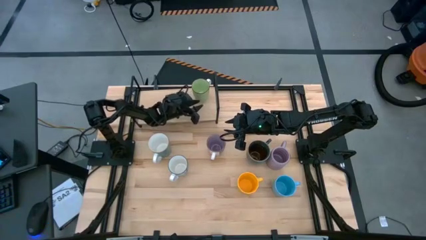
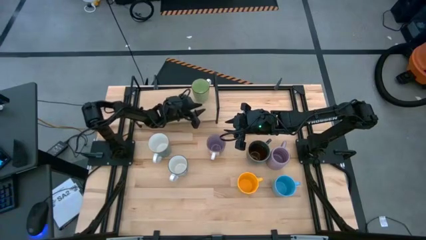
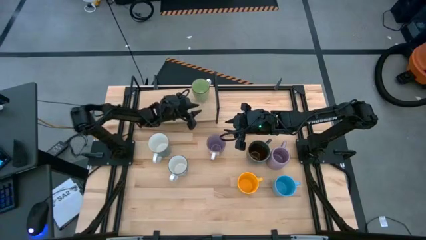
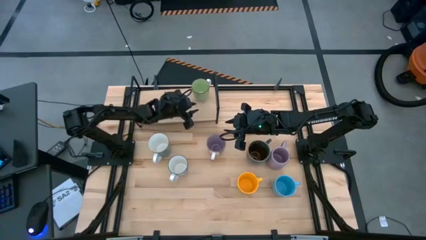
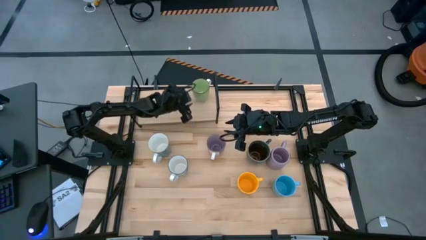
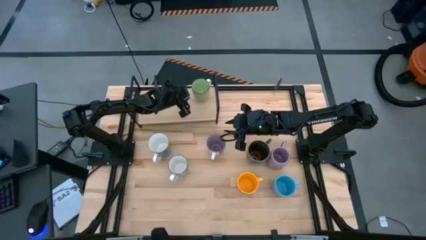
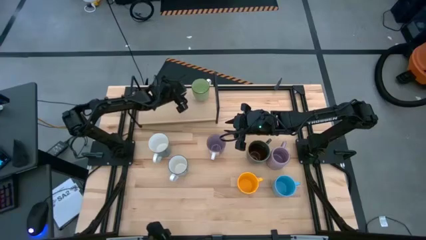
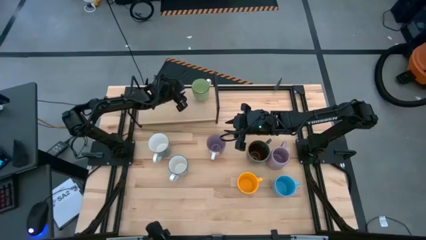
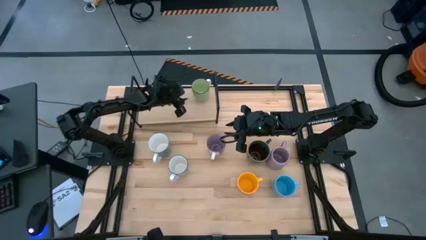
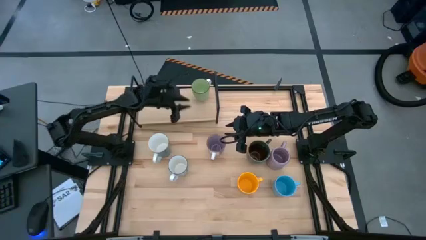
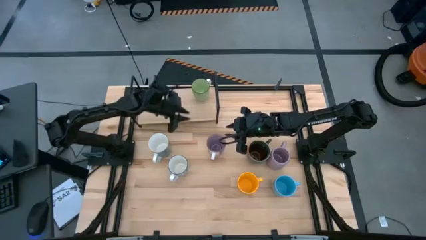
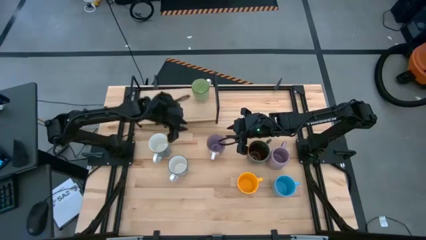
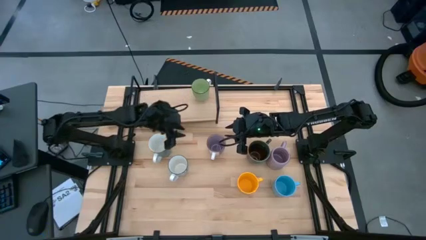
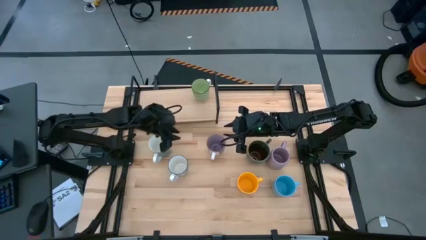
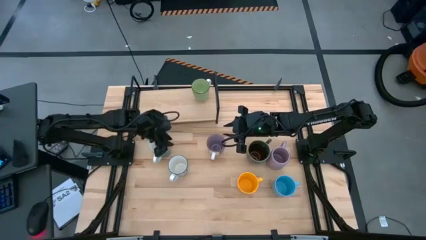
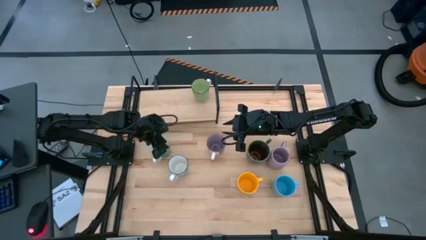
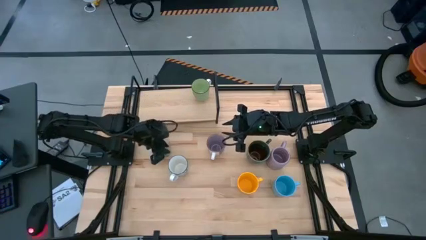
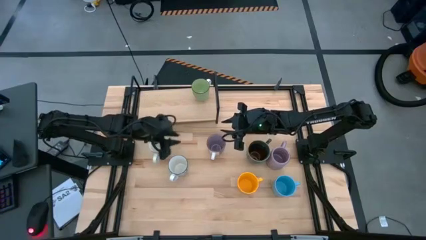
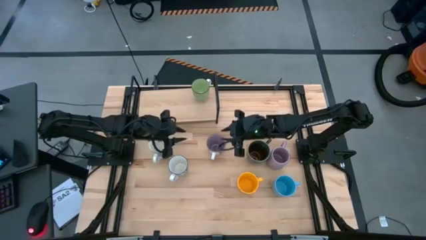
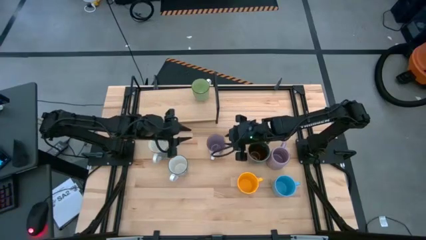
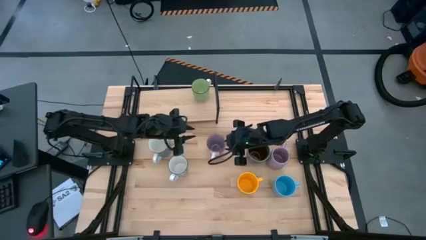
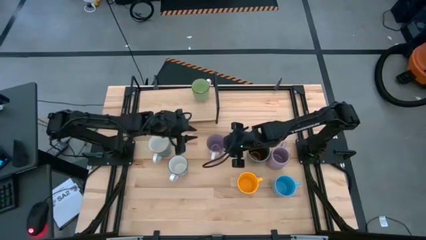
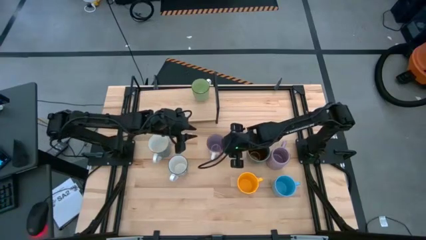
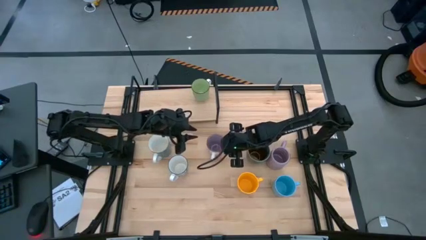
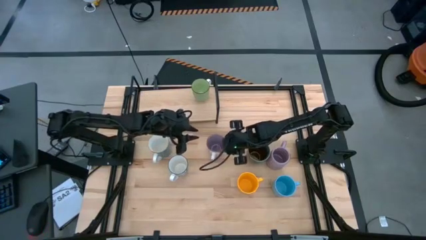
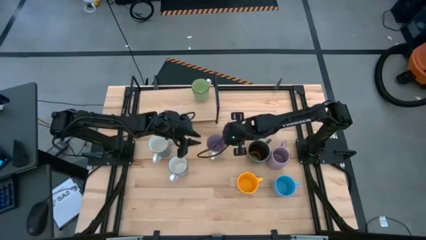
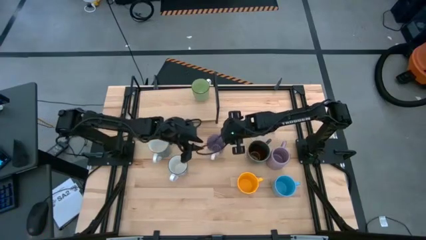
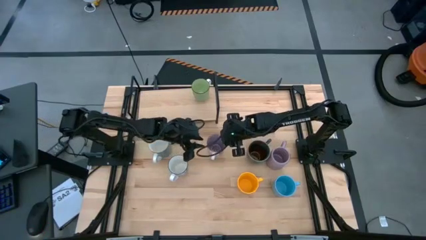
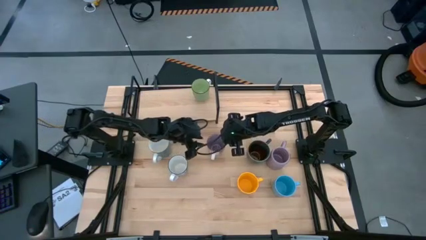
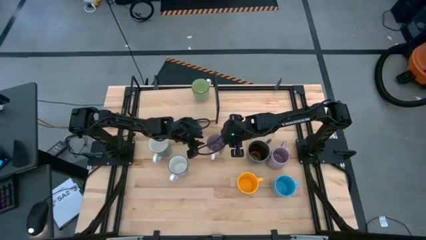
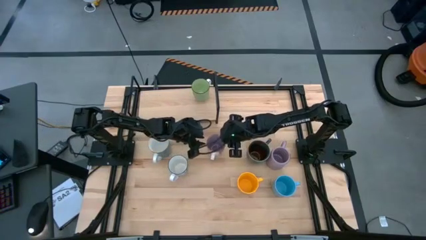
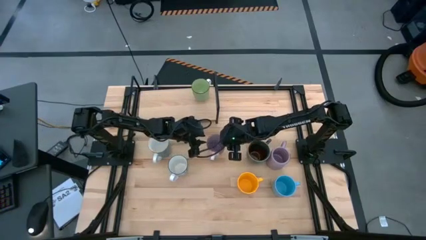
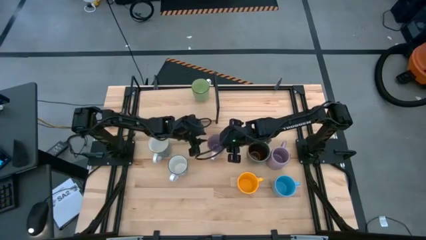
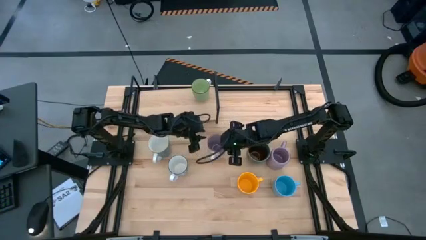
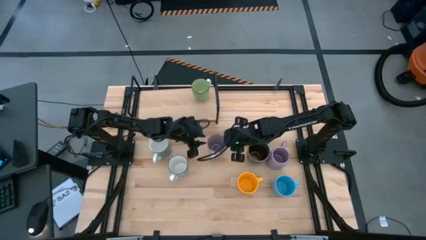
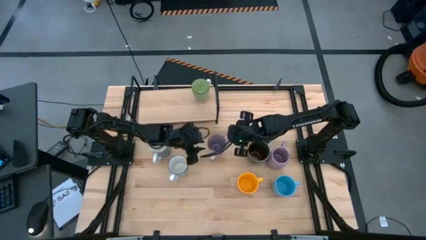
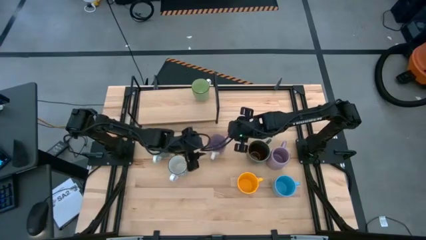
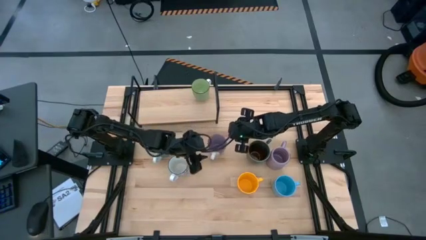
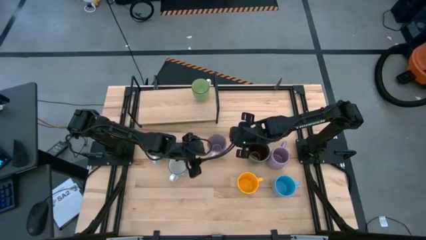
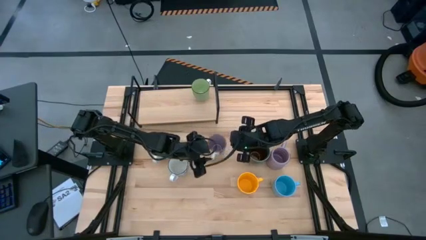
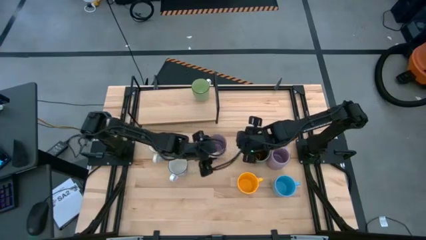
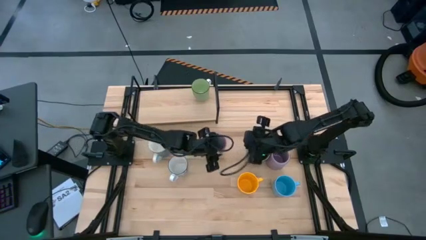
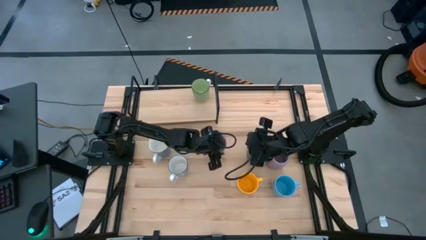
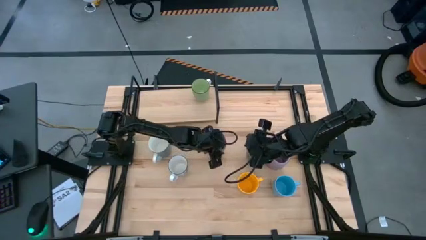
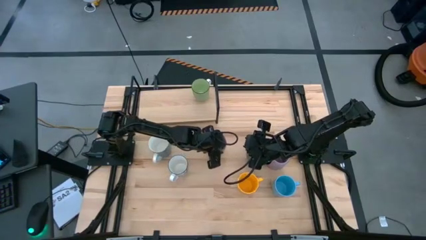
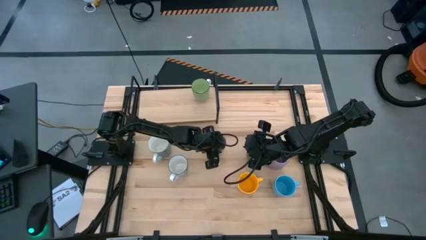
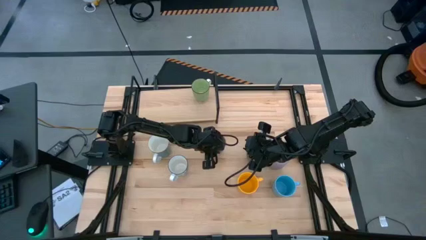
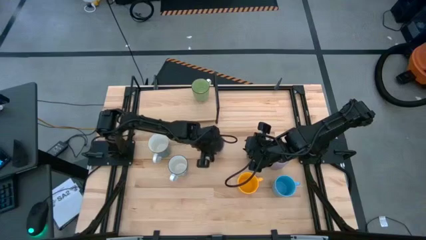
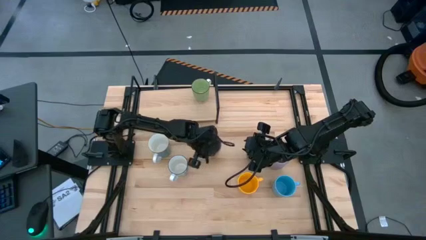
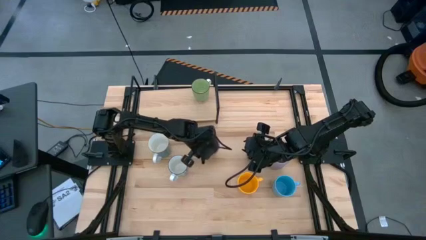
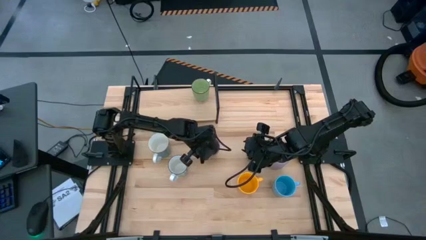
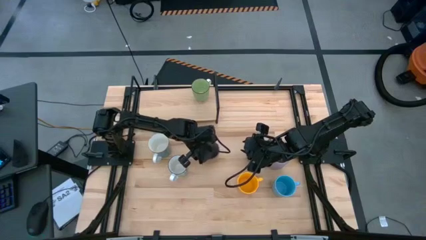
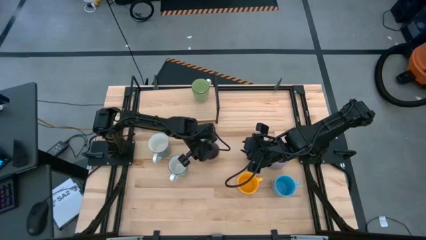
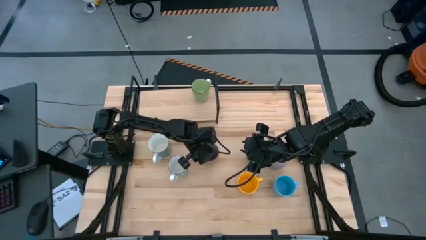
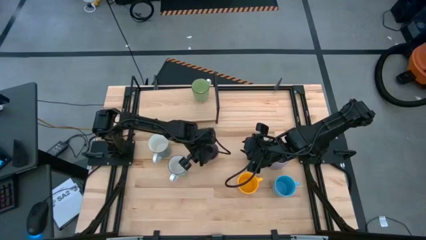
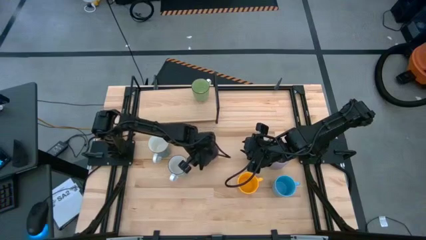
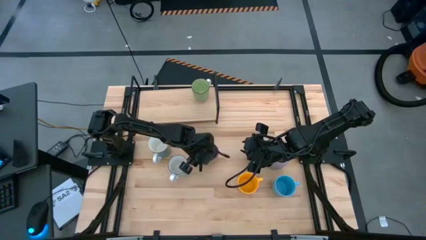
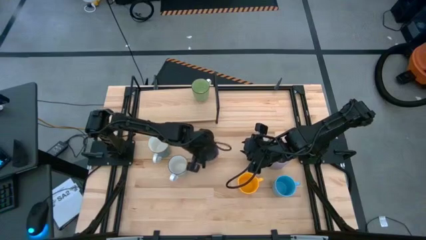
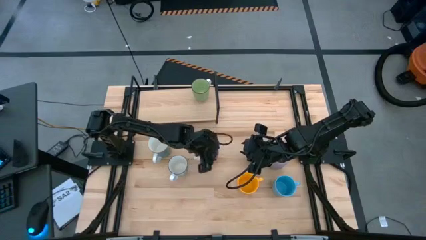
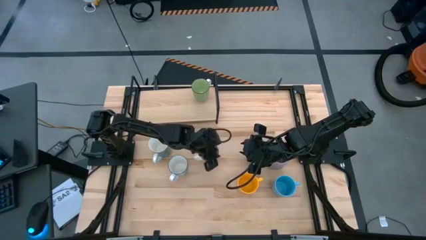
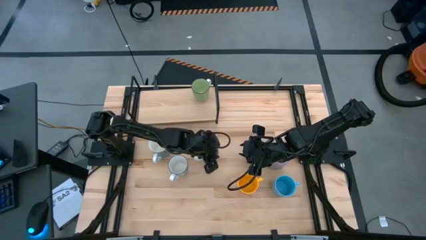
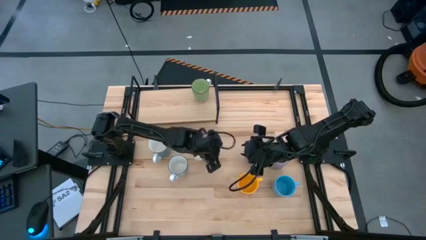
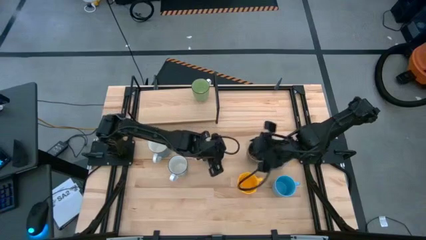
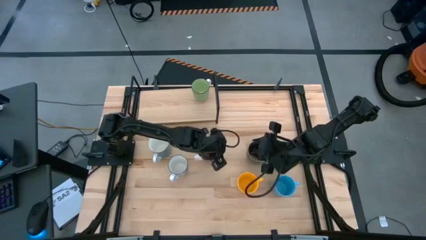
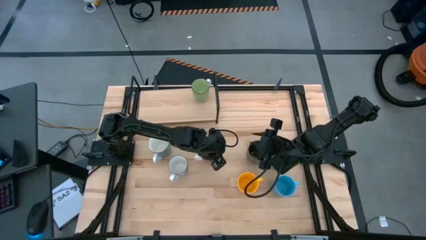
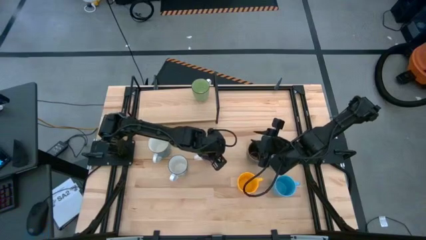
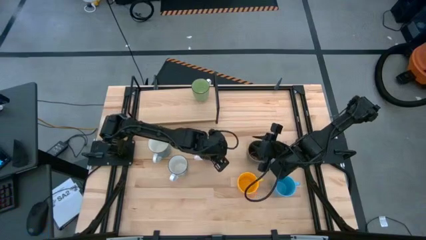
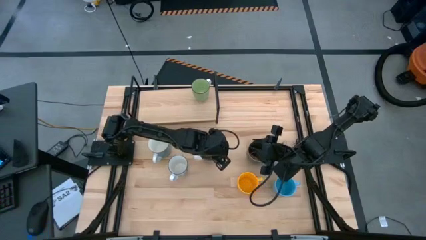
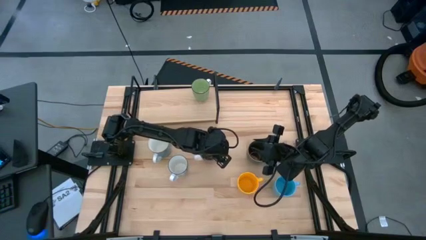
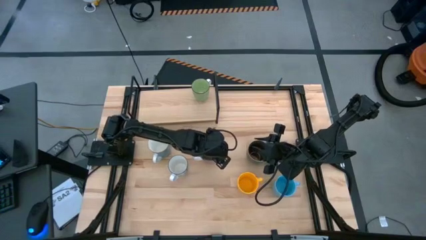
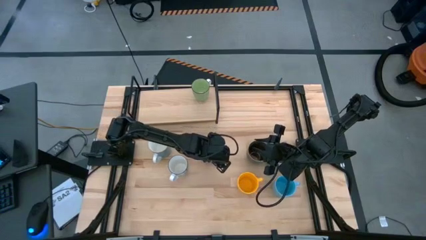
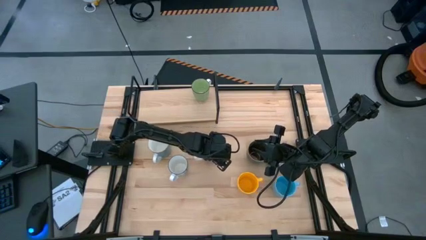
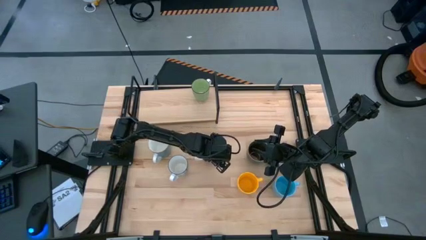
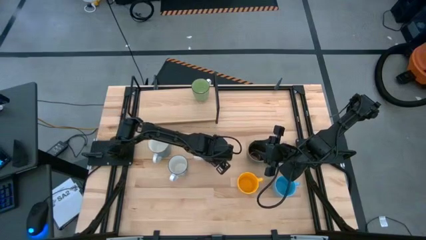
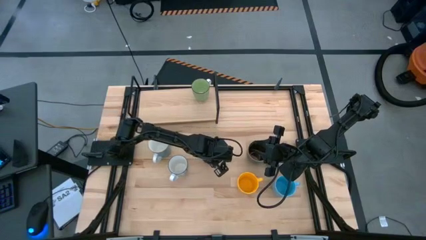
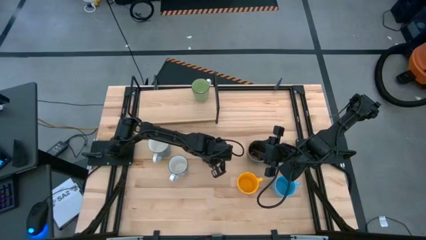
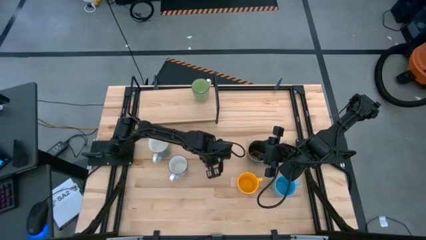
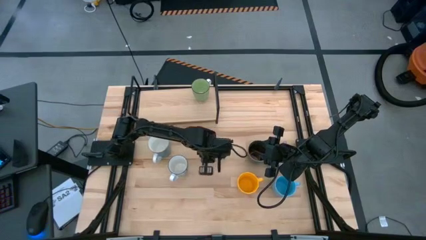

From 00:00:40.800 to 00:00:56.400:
Task: Place coffee mugs
Put the purple patterned mug on the shelf

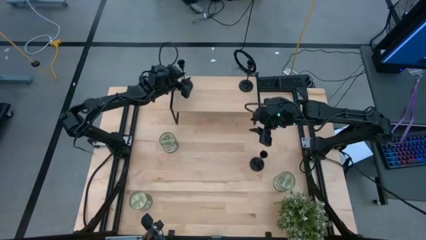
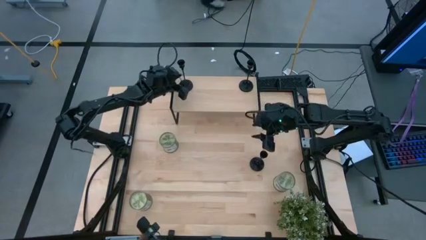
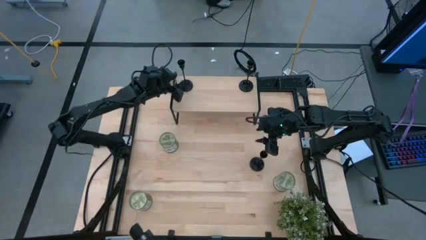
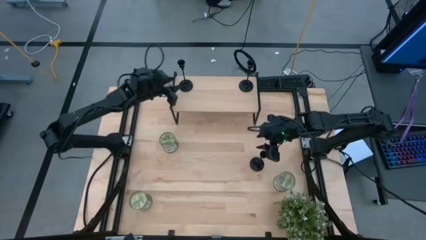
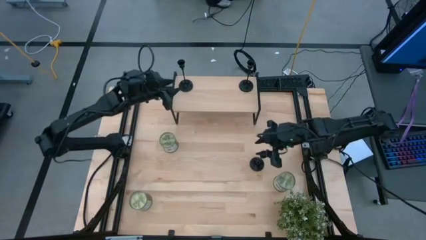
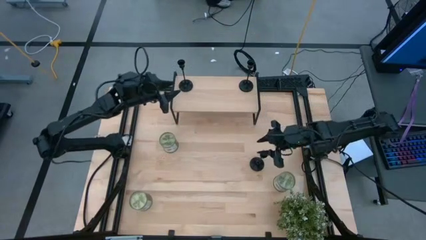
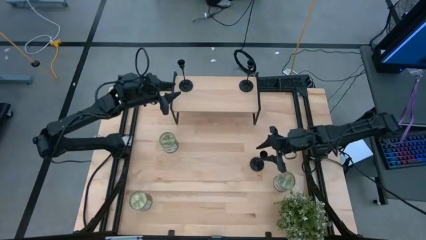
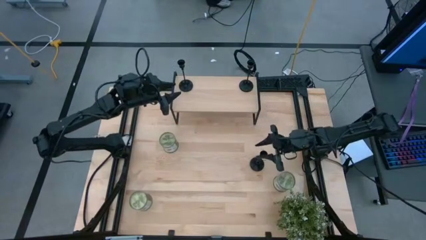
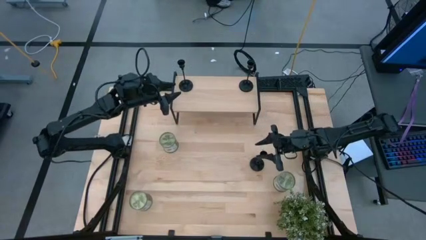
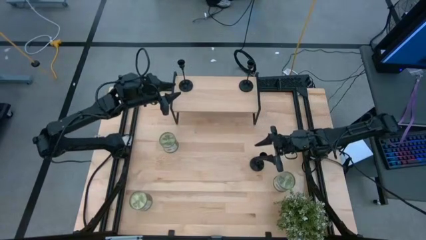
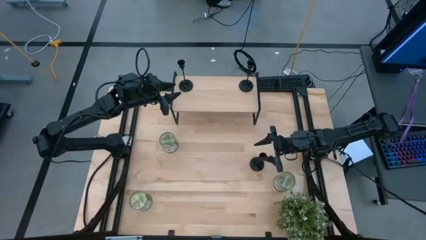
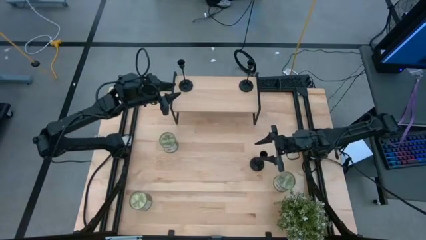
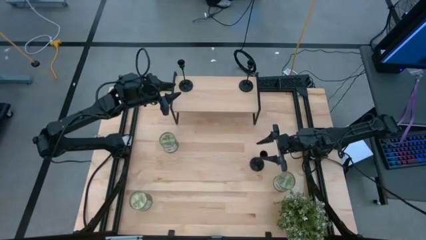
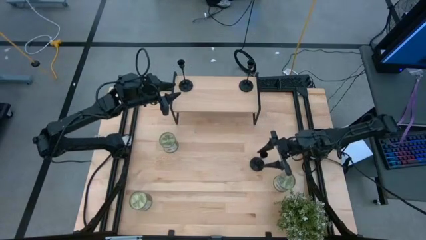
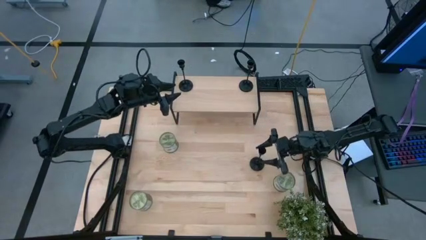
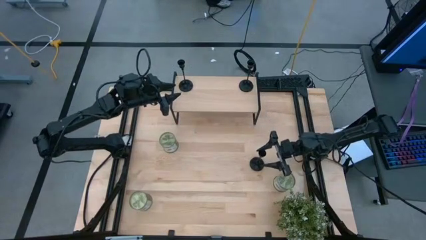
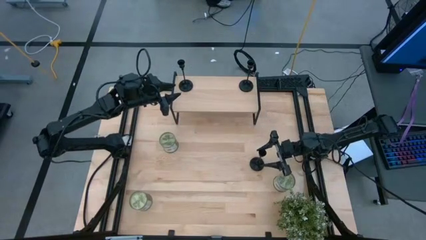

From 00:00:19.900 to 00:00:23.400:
Task: Pick & Place candle stick holders
Put the black candle holder on the shelf aligned with the other black candle holder
